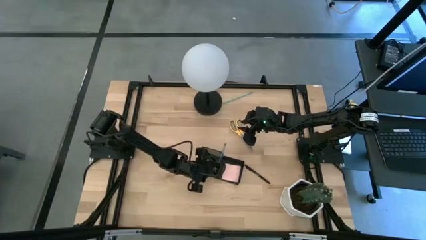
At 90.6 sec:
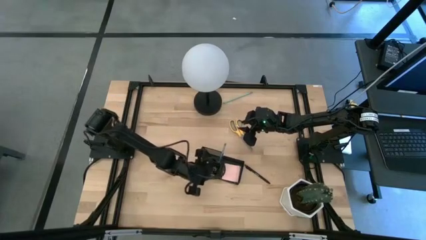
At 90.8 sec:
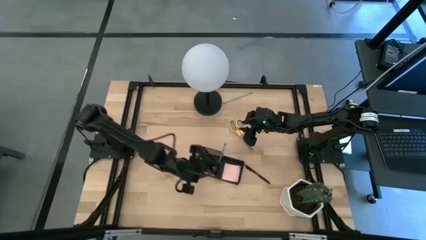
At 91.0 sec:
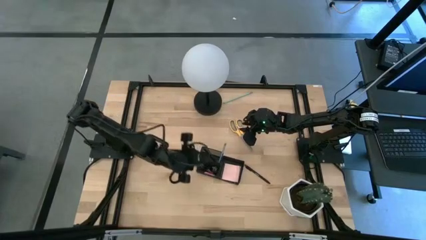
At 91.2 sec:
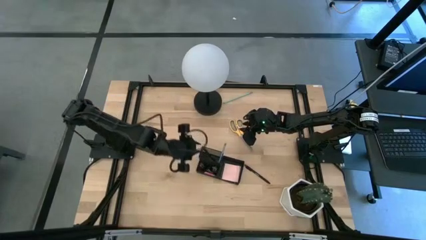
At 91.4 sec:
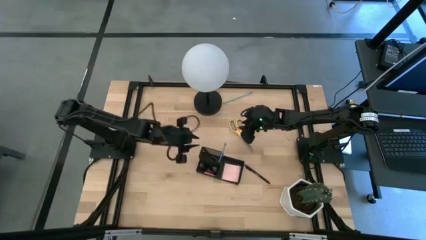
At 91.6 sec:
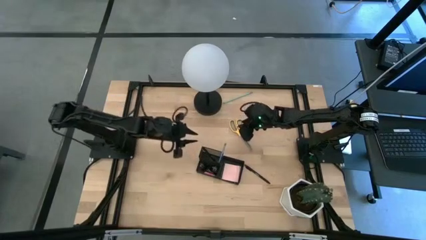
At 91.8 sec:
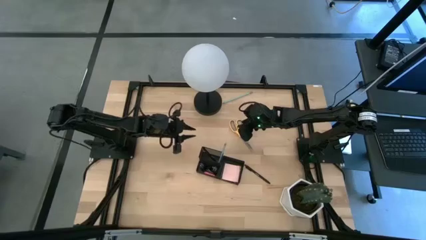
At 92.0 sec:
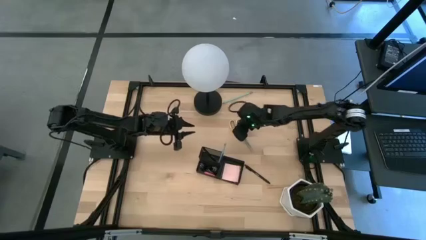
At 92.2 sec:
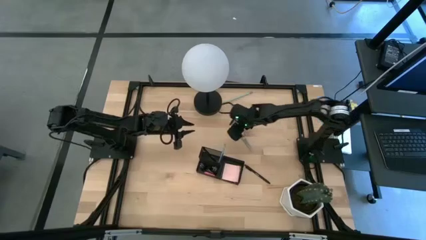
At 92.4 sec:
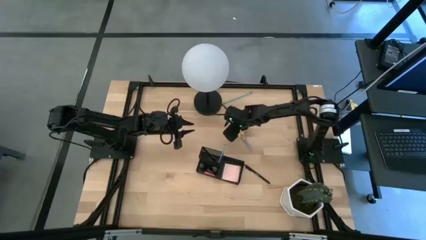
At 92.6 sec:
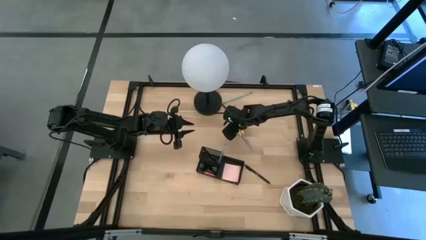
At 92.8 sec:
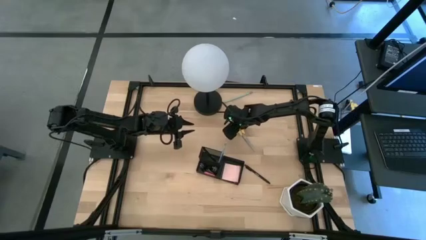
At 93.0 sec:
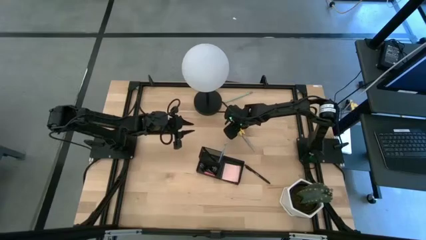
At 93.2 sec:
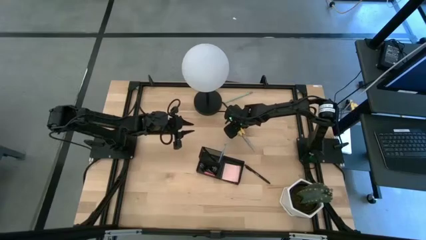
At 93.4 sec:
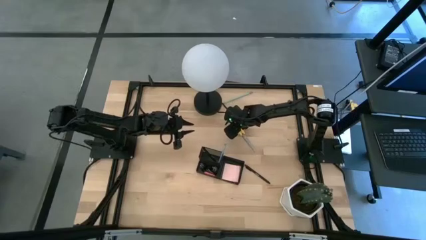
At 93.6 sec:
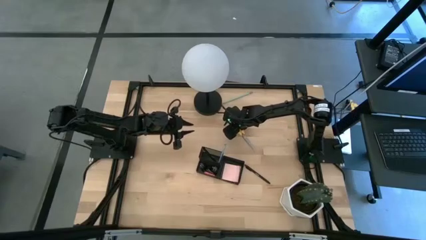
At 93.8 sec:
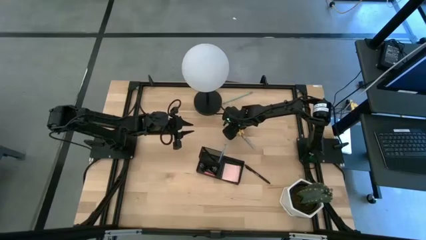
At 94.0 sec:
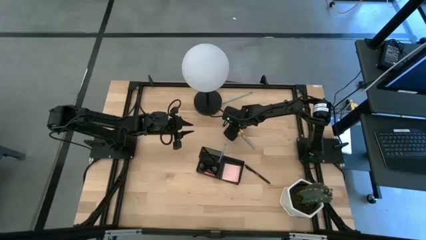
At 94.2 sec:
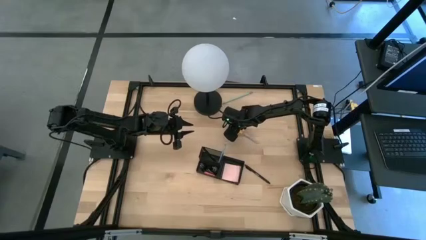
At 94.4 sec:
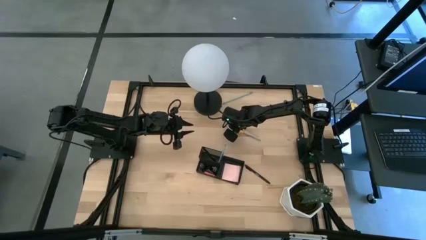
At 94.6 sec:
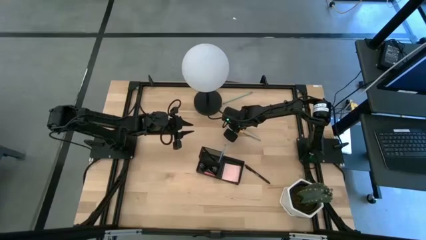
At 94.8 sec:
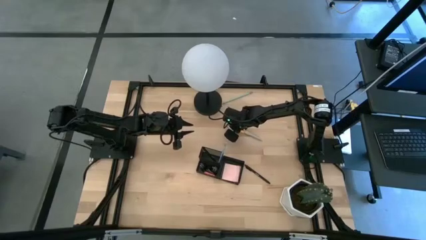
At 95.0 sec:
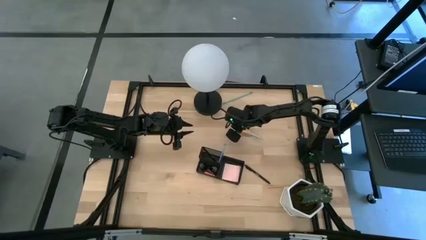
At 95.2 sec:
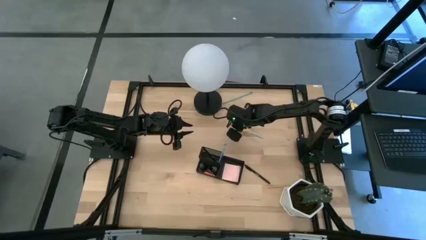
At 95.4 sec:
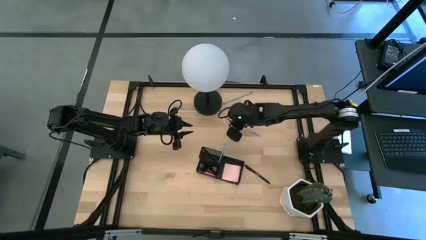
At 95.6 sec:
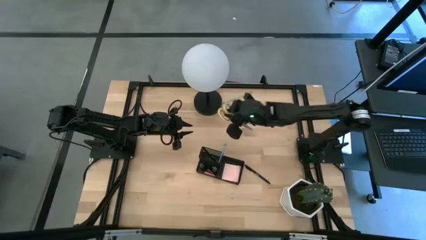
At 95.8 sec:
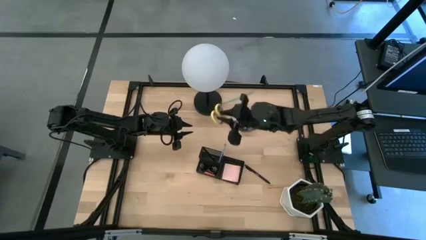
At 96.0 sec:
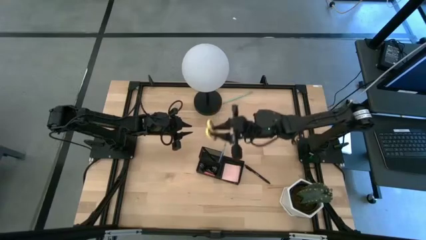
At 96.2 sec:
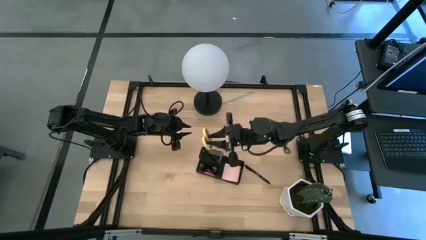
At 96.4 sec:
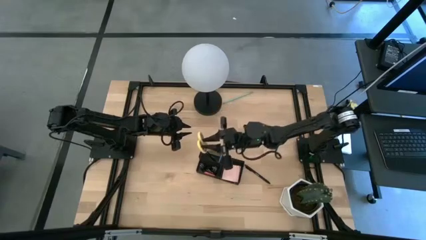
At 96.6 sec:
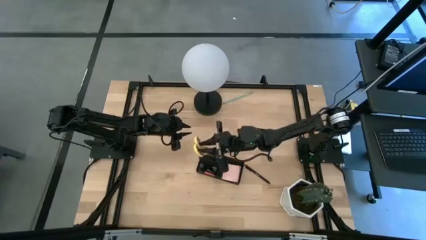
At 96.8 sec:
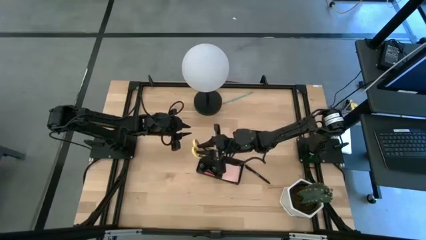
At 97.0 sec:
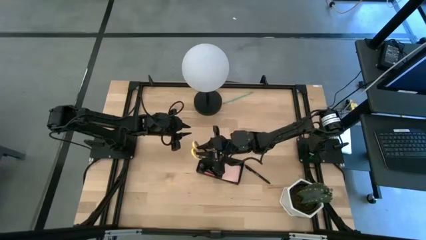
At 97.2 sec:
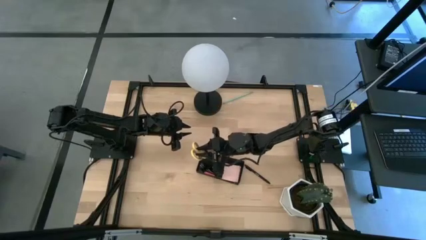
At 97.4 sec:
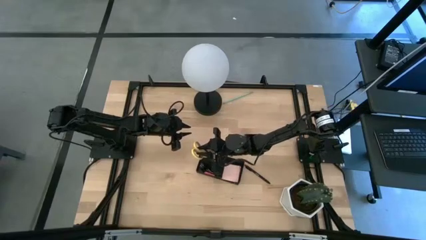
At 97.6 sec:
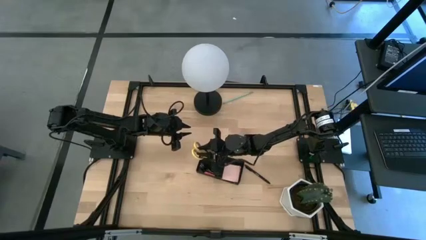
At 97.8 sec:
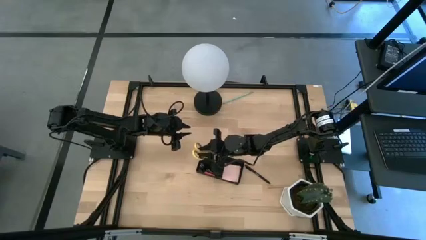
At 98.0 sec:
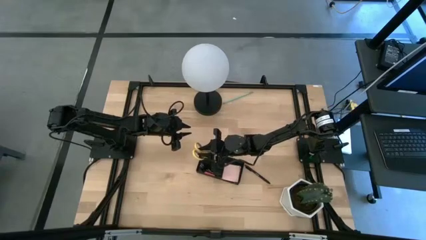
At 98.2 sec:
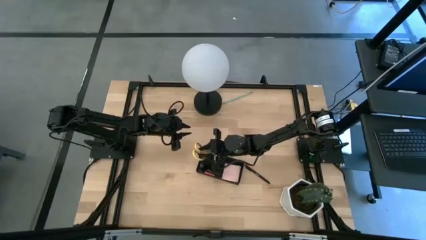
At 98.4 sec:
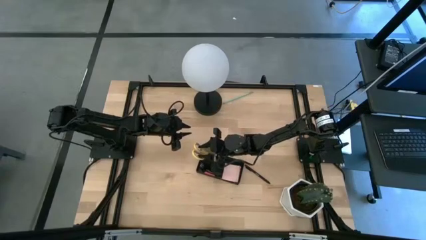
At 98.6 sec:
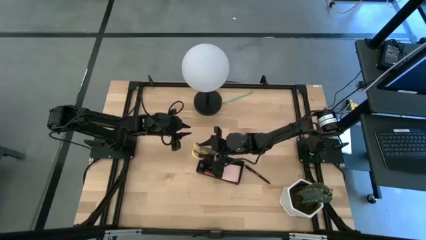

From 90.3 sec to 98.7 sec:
Task: Pick and place office supplies into organizer
Put the yellow scissors into the black desk organizer

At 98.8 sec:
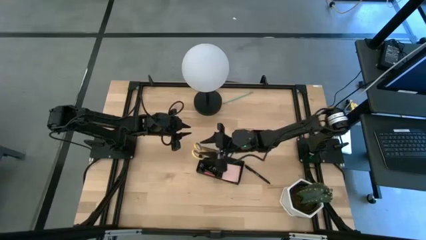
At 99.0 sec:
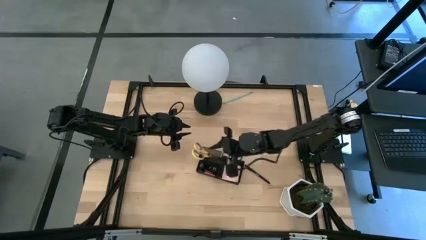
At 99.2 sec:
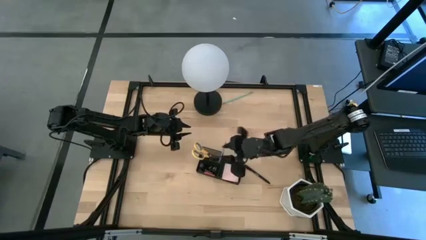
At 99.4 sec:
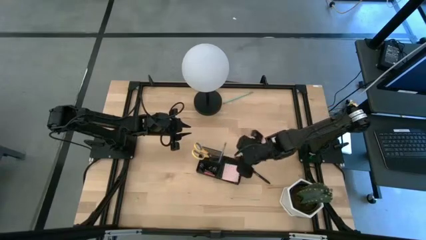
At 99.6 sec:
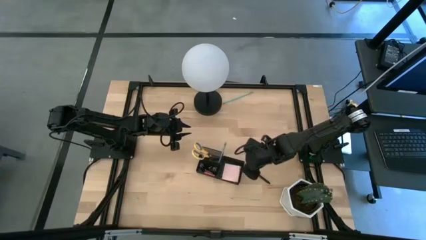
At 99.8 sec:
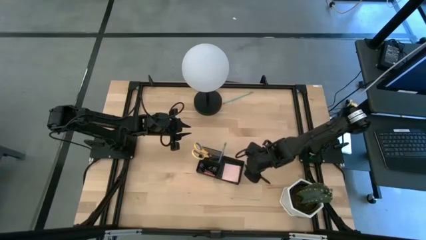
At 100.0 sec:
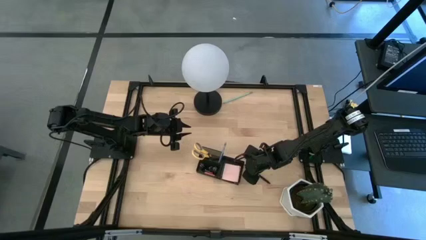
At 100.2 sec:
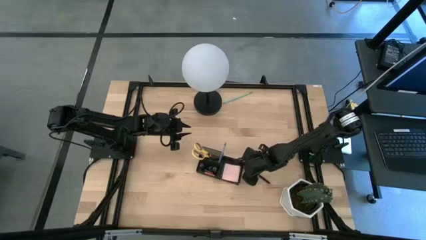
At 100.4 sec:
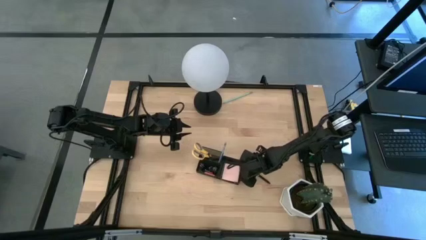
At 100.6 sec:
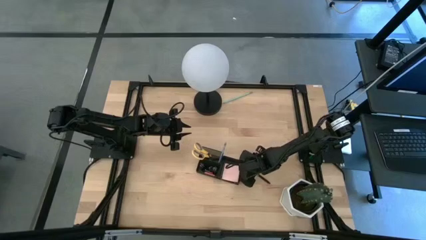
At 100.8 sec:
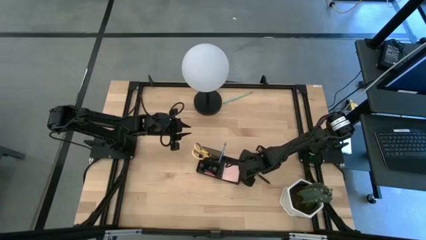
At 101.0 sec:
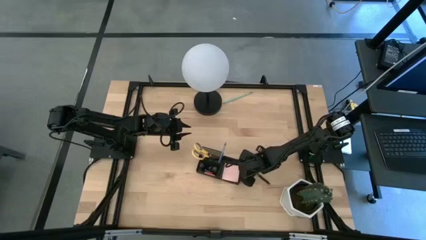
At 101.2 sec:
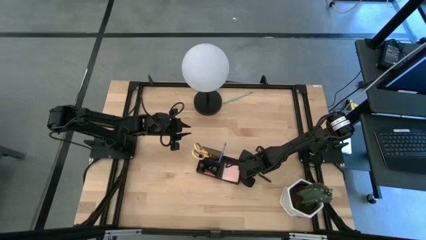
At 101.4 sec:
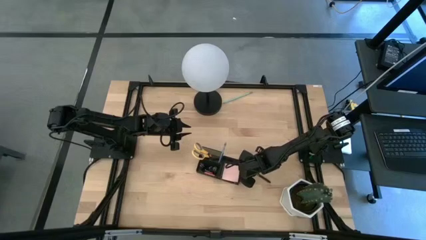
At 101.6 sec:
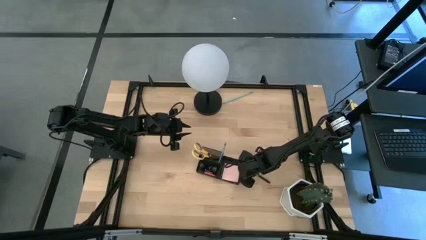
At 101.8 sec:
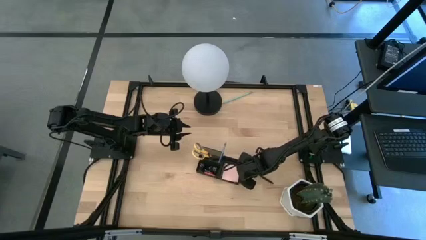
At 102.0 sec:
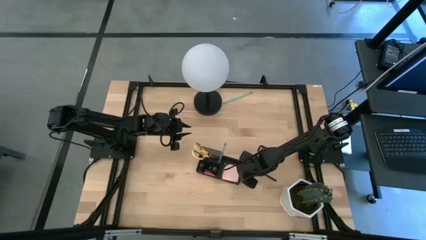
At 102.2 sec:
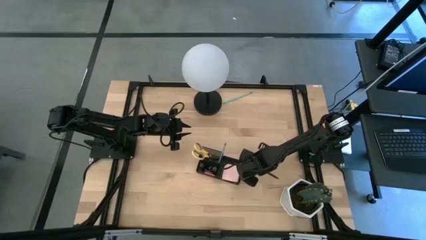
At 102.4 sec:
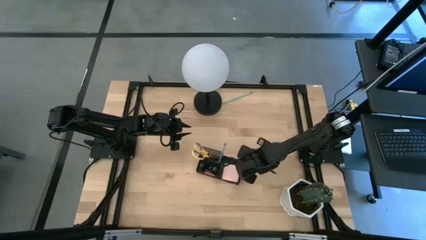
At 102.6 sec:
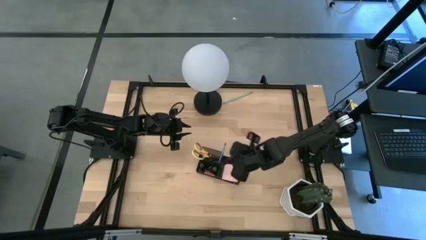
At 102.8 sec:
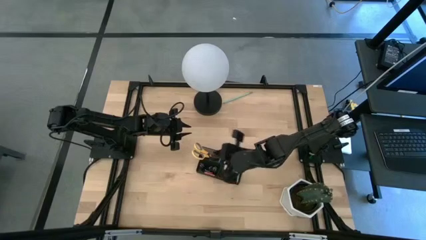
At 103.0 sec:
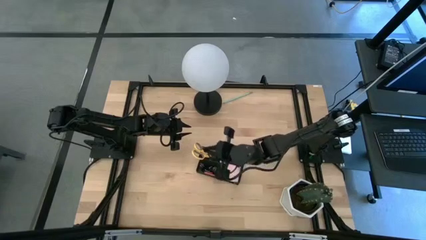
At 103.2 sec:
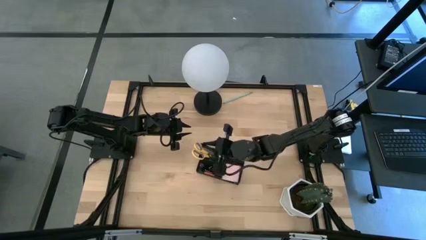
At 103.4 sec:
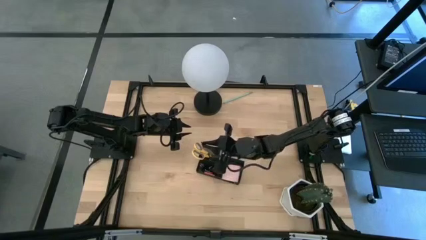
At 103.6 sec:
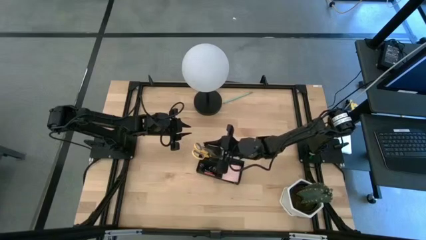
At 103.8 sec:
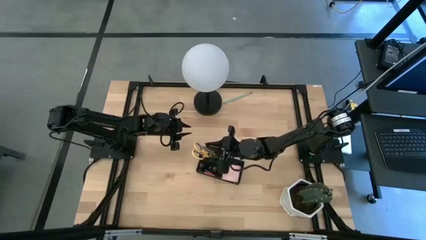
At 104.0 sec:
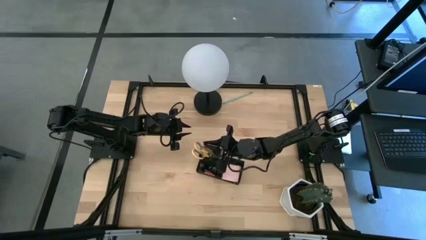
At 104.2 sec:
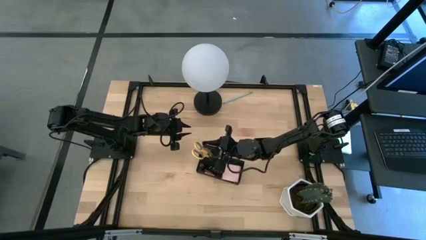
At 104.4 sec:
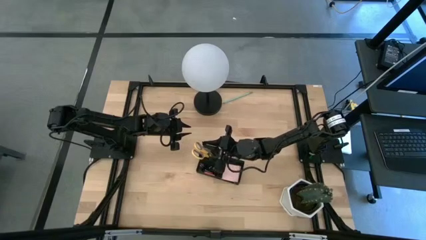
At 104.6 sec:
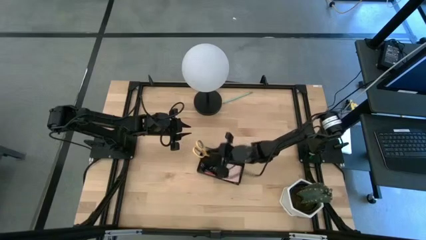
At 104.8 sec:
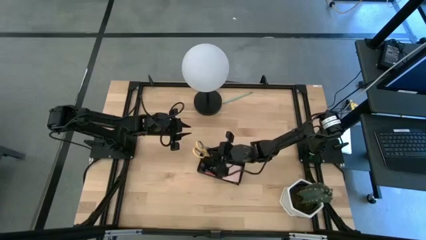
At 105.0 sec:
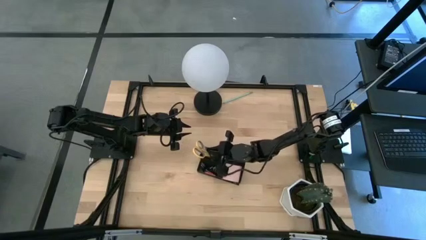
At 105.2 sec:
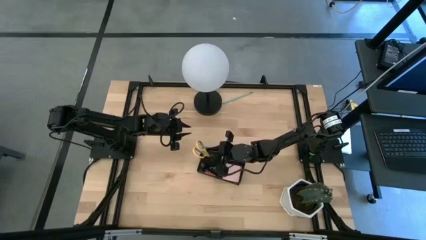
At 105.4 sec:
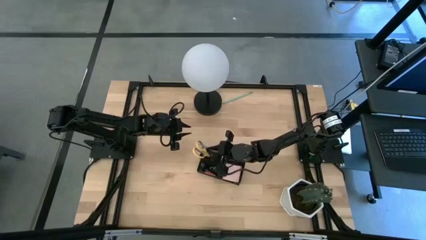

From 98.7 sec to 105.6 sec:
Put the black pen into the black desk organizer

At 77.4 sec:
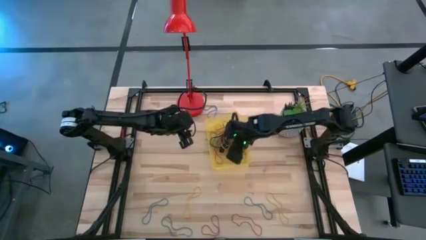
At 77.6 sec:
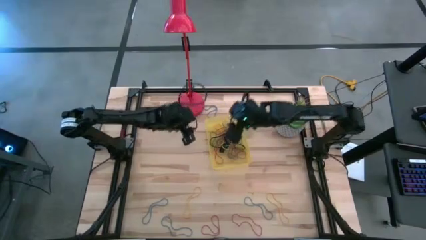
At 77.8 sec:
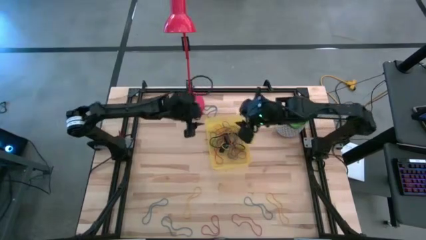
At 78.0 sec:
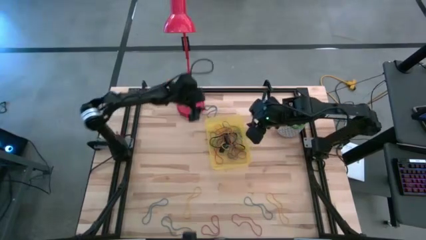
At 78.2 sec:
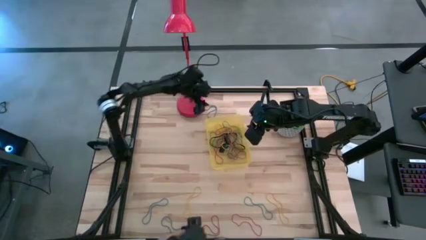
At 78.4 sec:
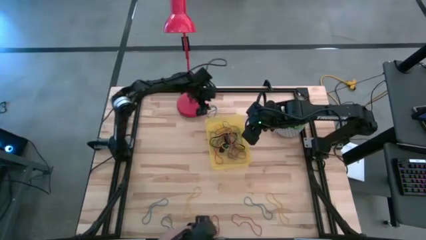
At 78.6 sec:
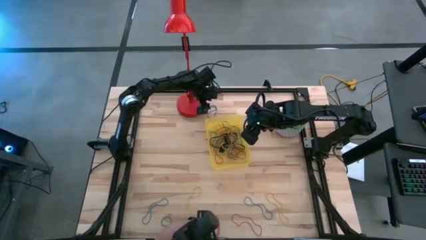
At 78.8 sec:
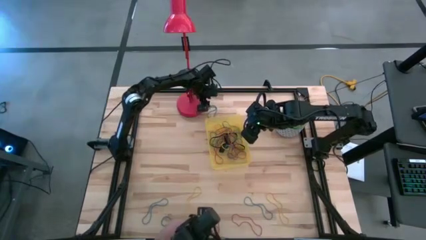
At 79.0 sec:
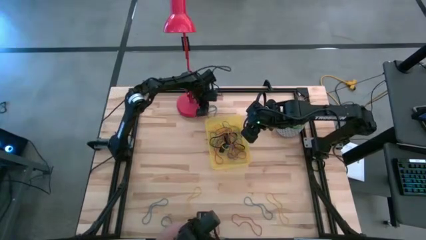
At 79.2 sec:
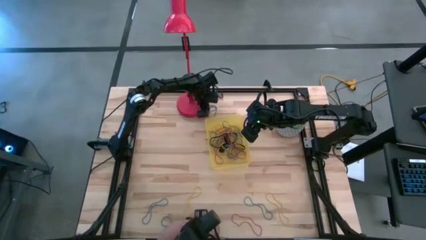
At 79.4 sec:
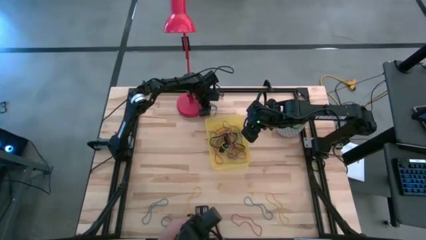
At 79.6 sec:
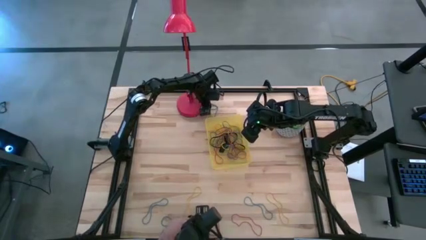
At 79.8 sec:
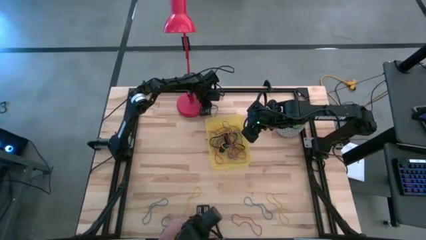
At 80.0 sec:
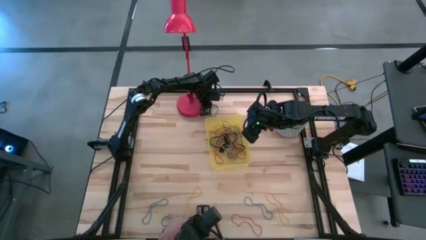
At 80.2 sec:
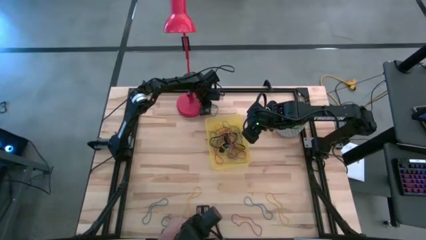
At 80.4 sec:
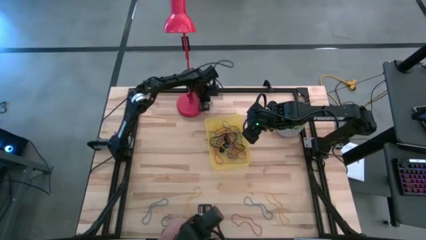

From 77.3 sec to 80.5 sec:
Task: Pick and place rubber bands into bin
Put the blue rubber band into the yellow bin
